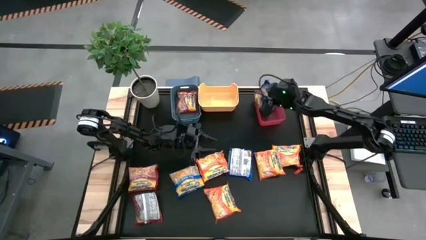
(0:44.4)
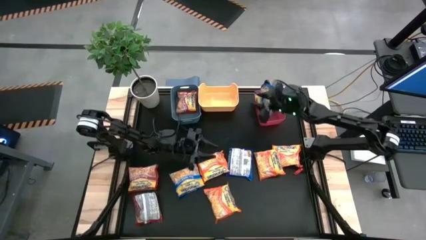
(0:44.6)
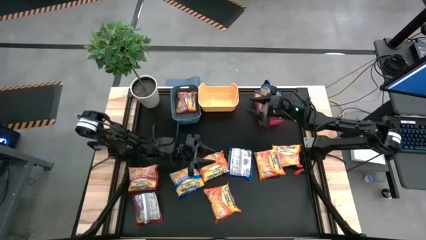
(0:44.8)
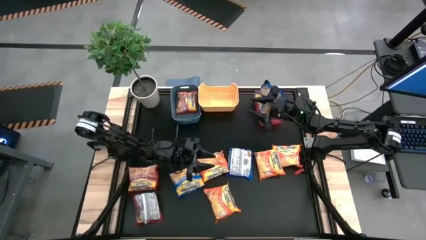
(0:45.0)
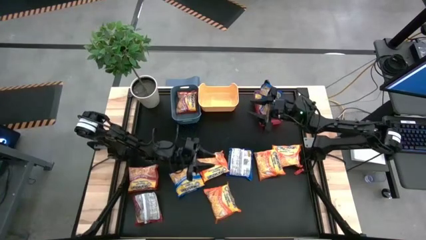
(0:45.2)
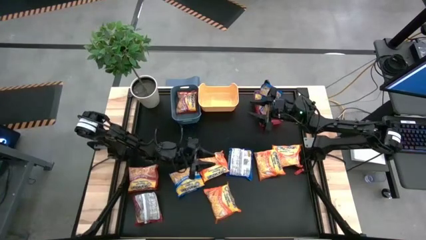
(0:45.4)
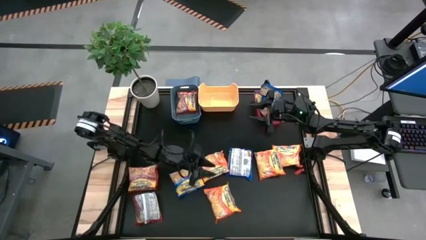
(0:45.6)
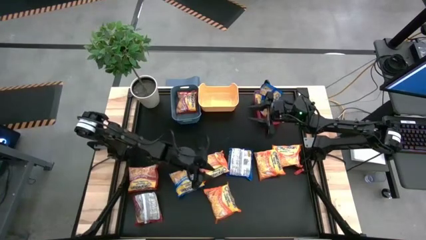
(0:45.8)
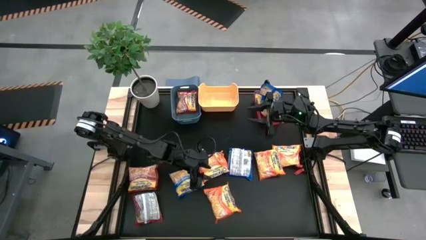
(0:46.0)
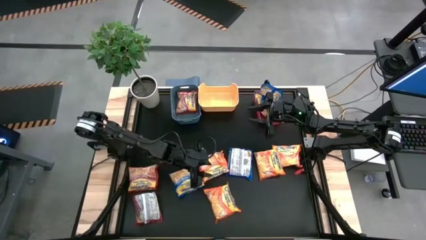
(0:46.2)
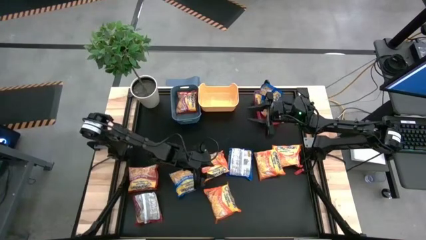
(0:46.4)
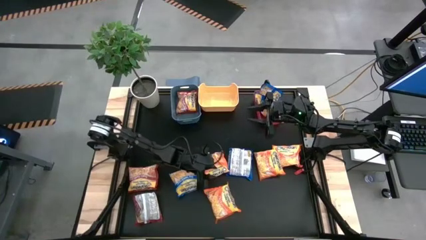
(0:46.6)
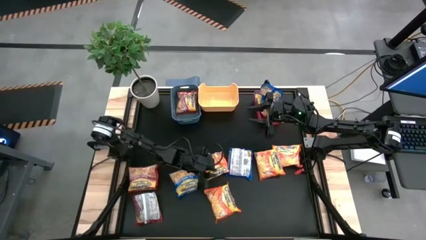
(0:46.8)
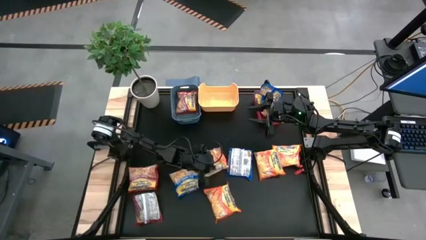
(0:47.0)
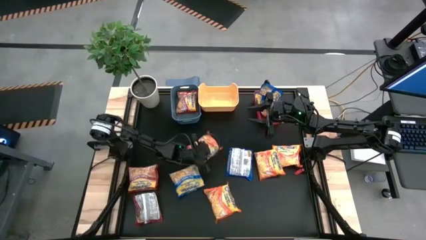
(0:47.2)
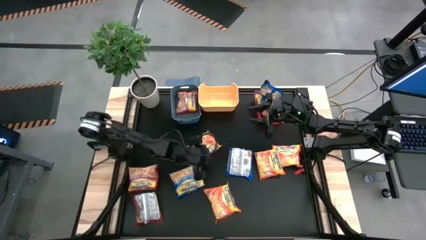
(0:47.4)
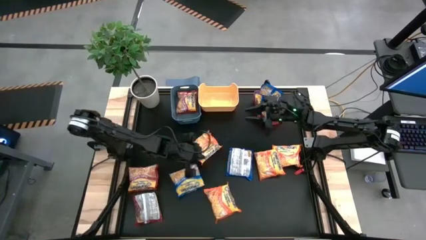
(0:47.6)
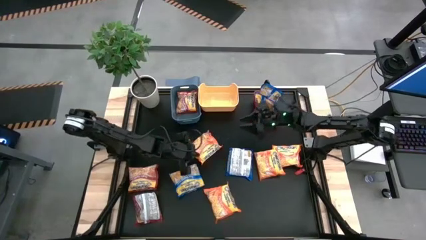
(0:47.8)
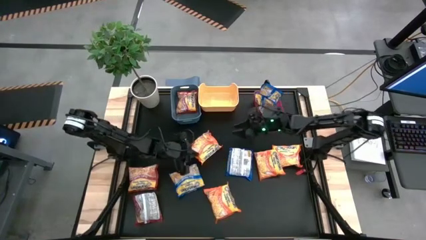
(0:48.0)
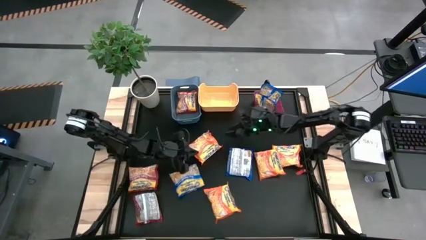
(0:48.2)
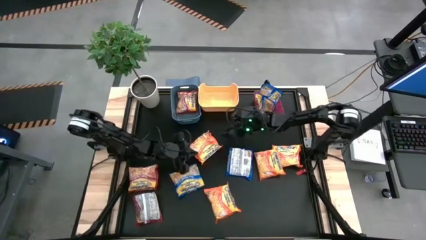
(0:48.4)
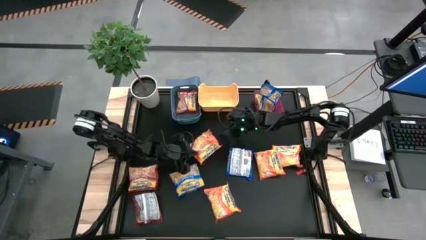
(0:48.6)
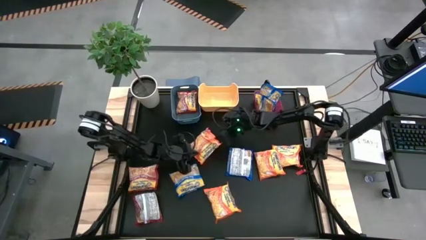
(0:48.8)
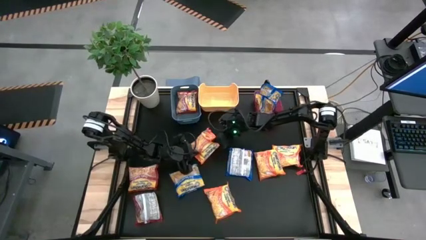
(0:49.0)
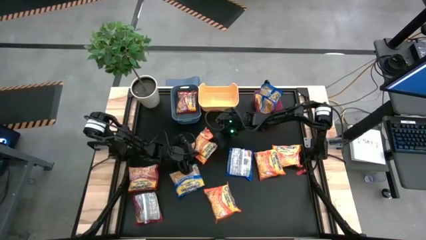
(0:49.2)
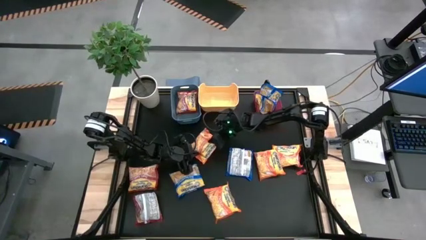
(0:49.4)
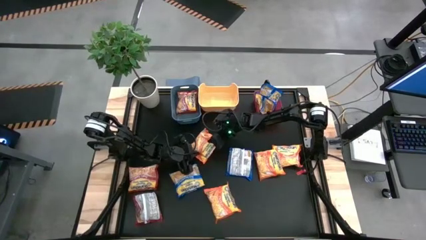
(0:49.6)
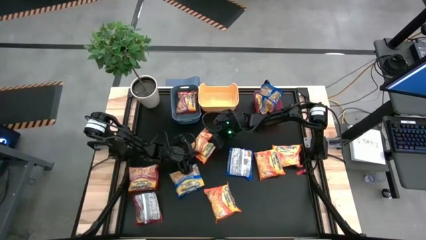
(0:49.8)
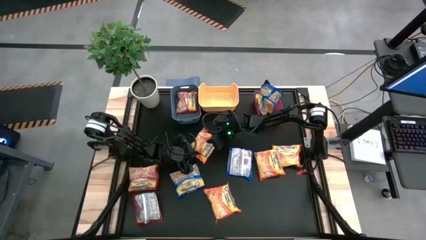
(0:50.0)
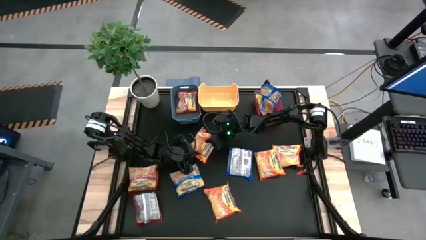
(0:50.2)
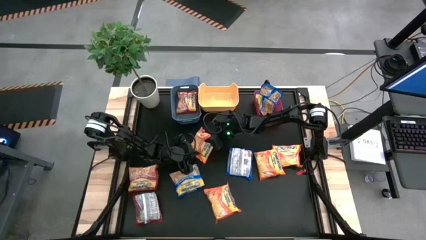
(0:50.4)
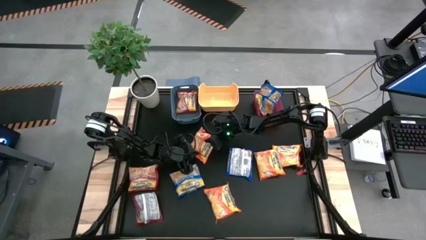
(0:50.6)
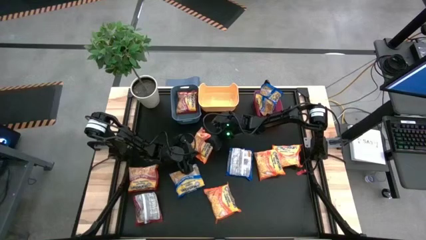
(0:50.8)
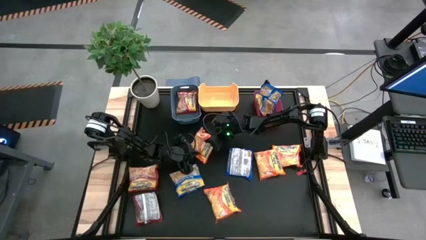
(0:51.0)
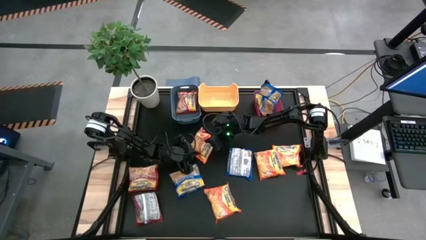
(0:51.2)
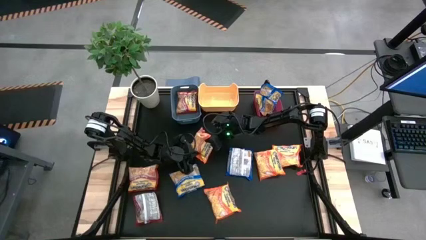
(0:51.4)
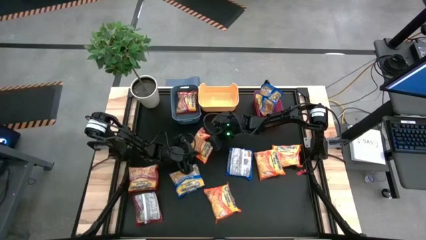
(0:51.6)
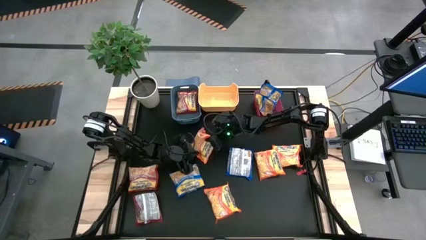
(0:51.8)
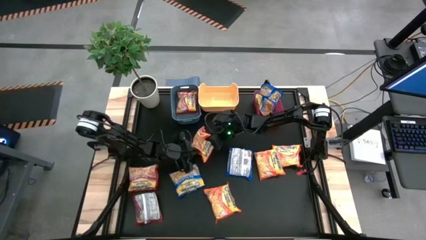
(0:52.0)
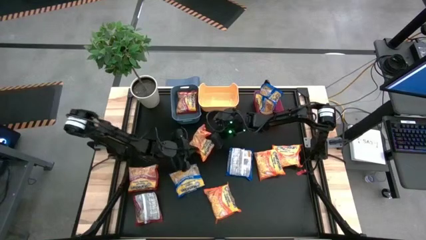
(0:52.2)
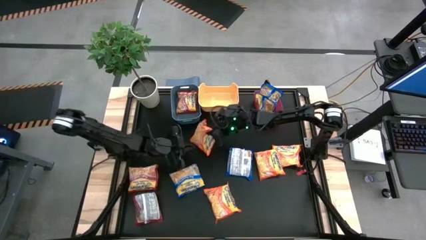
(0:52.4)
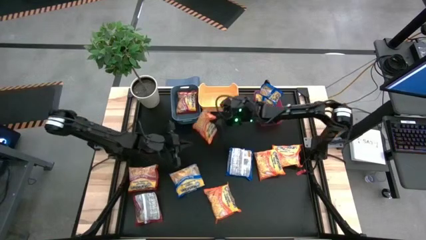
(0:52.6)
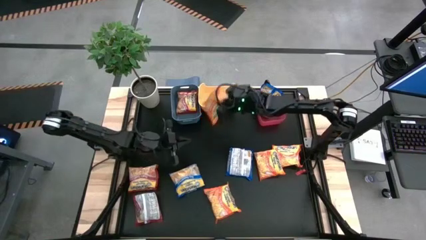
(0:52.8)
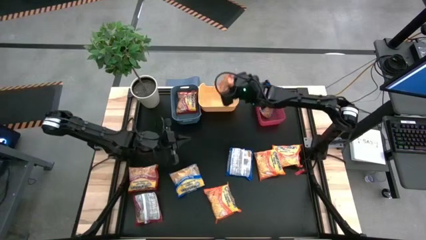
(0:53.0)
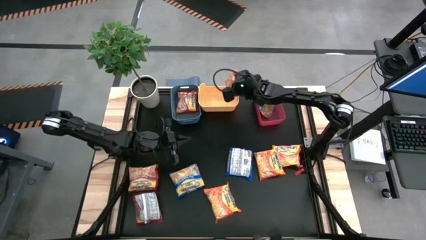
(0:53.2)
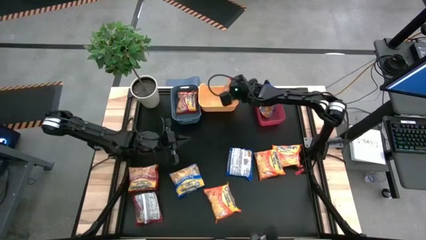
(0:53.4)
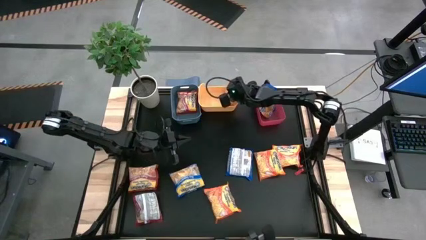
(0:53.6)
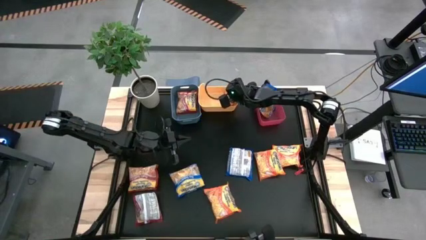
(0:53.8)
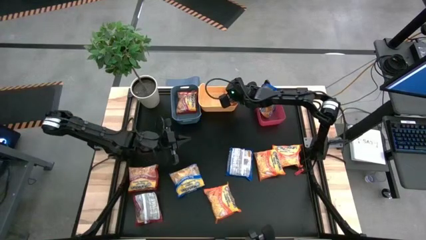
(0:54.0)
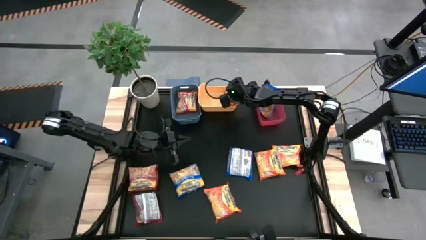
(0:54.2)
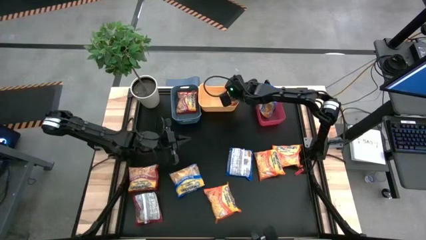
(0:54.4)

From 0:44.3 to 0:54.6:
Task: Sort Maruchan noodles
Put the orange noodle pack into the yellow bin

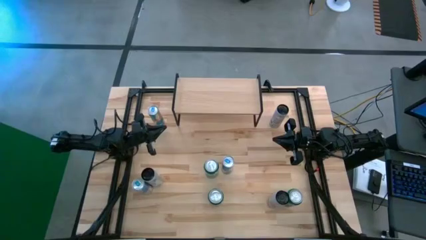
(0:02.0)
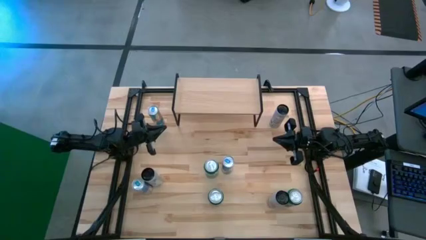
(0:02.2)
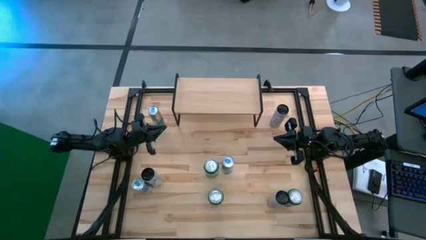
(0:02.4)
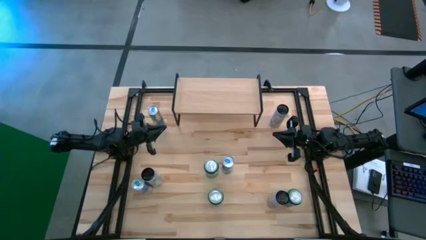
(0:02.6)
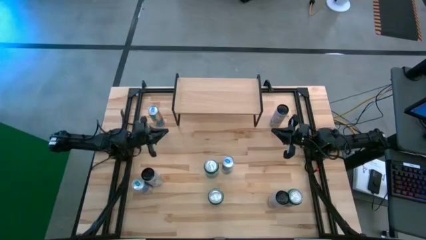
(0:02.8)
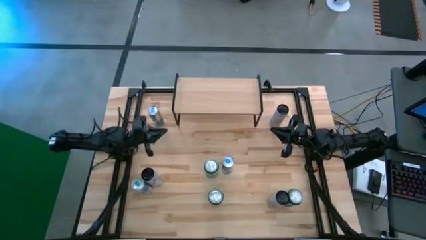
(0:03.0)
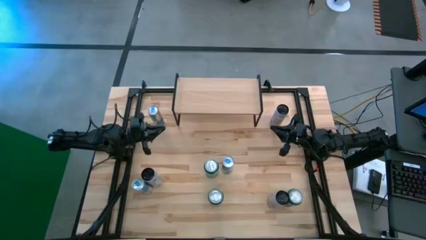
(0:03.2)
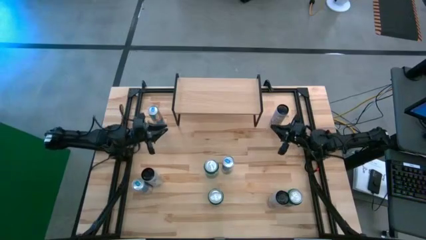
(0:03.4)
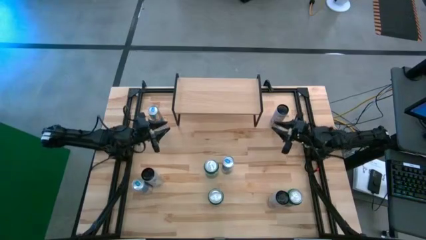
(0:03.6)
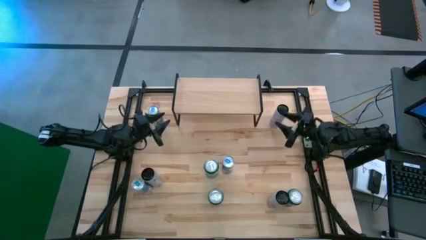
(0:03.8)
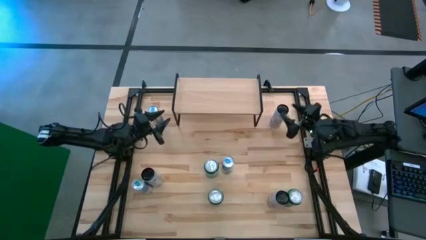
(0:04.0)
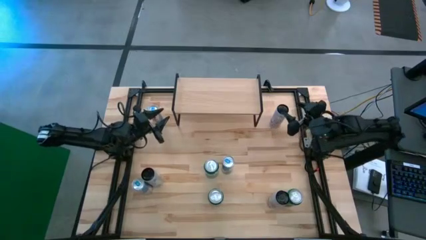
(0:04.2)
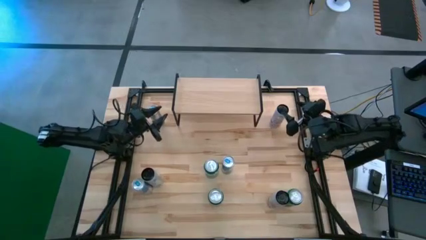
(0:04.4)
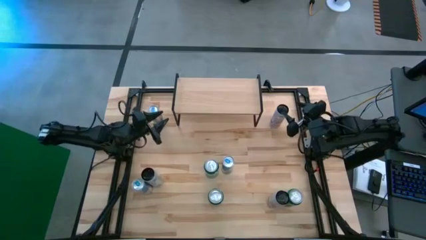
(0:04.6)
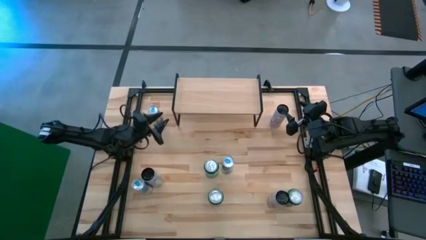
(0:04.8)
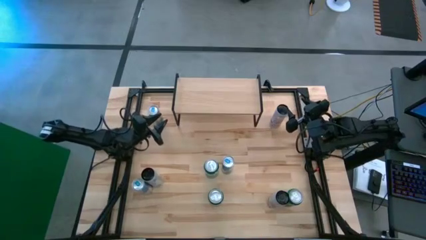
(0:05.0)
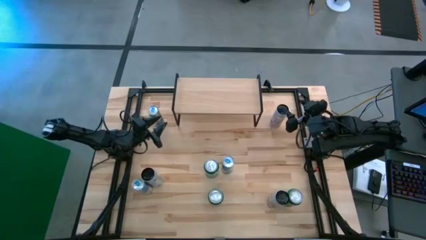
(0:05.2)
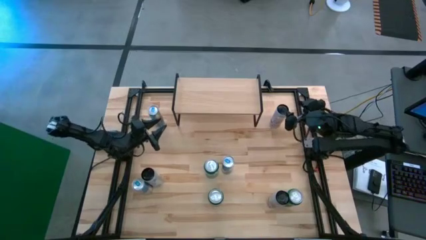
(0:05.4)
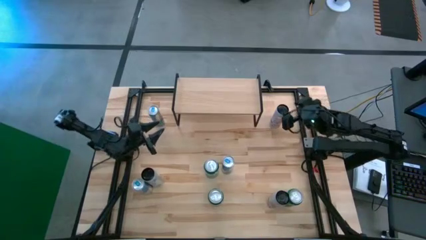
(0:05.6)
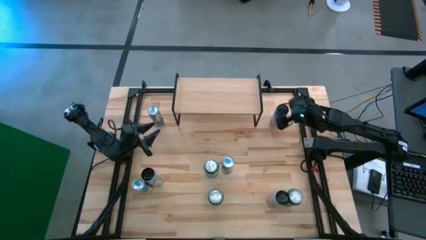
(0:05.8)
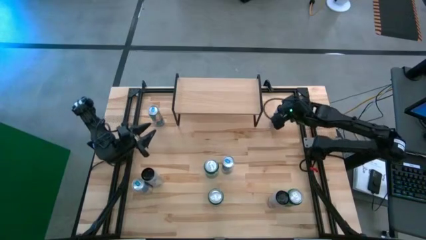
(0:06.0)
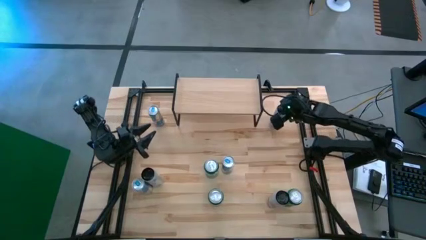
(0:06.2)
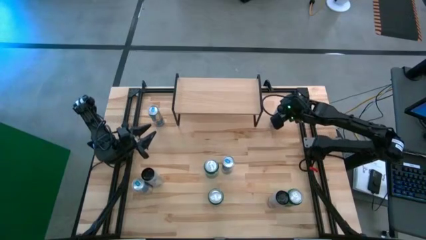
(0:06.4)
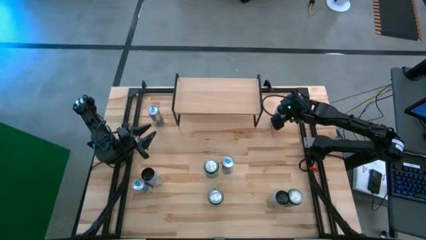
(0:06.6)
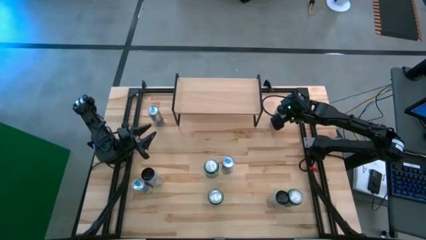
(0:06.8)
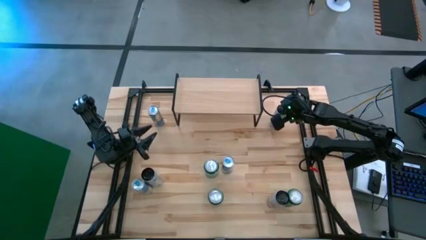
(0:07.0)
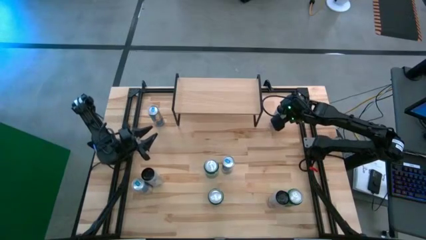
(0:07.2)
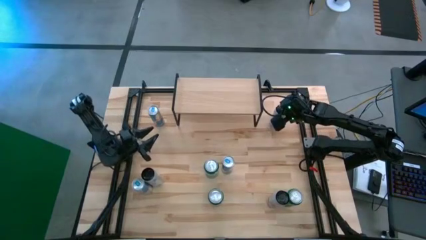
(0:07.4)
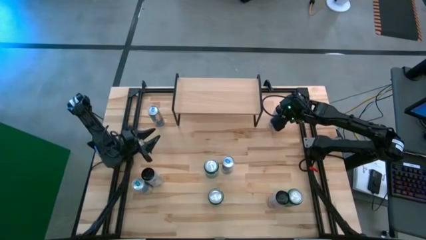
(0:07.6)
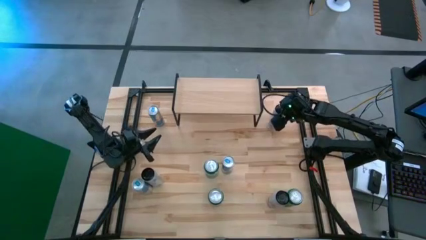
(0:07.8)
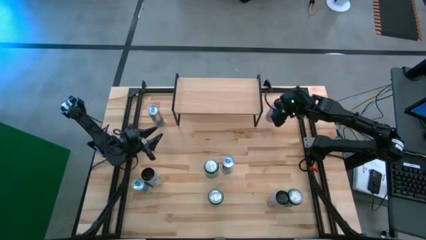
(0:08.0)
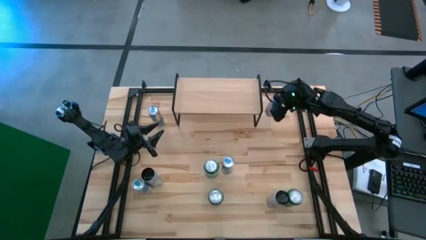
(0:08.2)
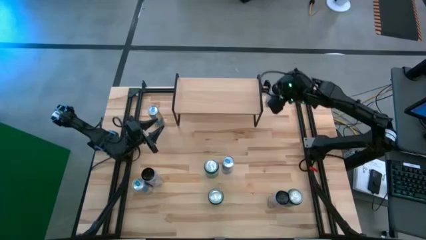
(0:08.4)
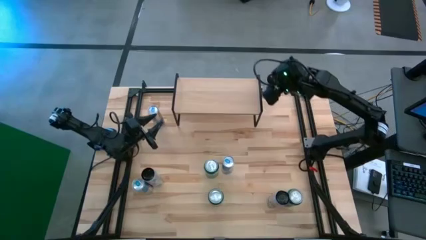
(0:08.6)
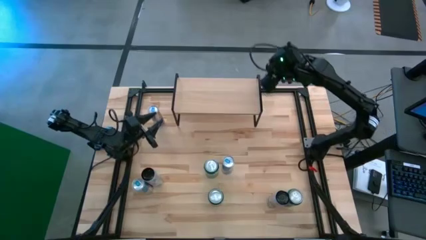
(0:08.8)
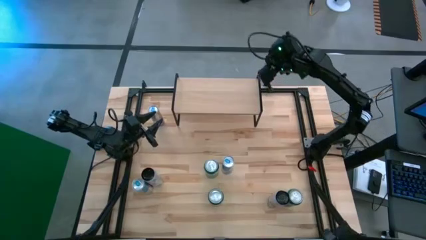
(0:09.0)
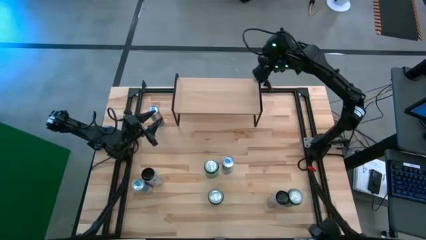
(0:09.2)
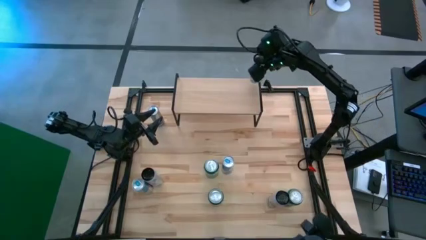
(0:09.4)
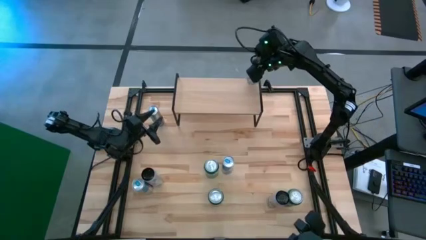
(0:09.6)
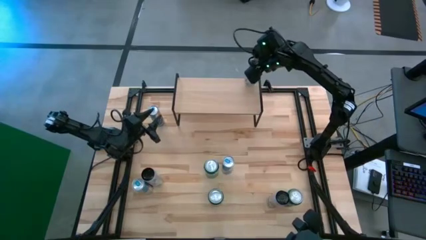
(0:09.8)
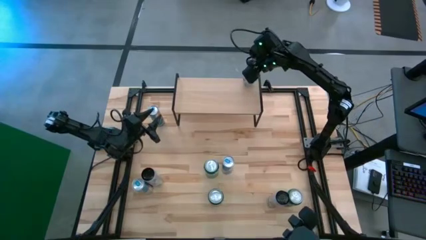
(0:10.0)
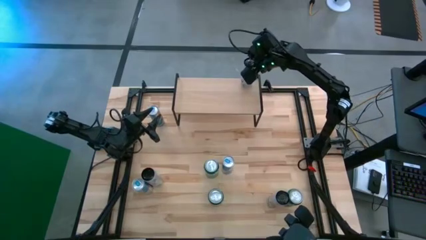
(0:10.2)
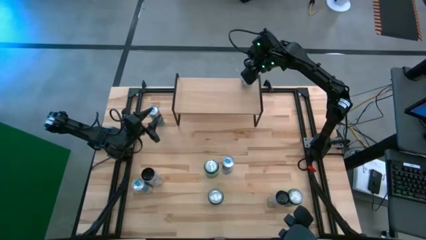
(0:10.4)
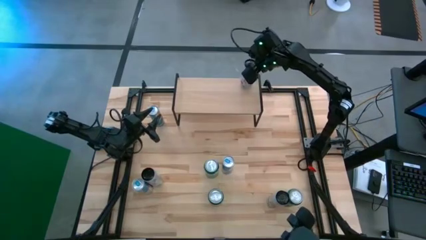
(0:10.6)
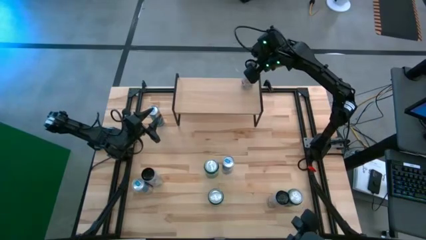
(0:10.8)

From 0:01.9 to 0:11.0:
Task: Place canned beverage on shelf
Put the top right white-pink soda can on the shelf
